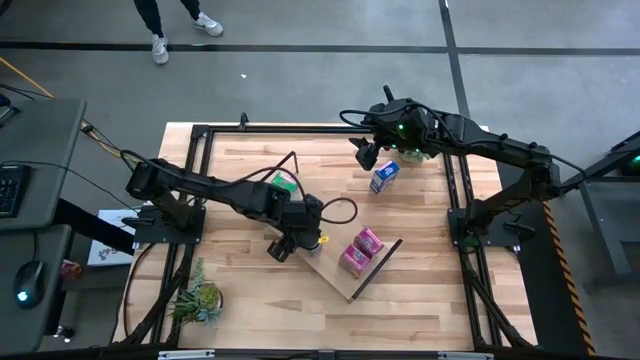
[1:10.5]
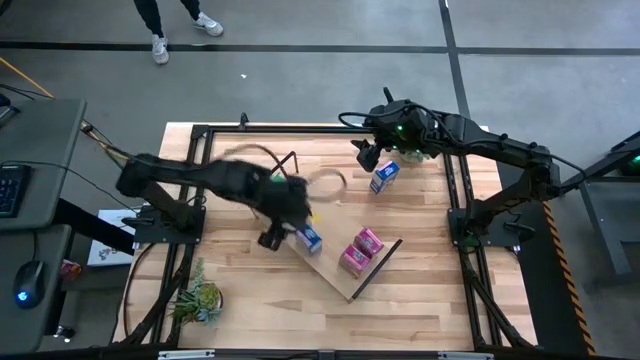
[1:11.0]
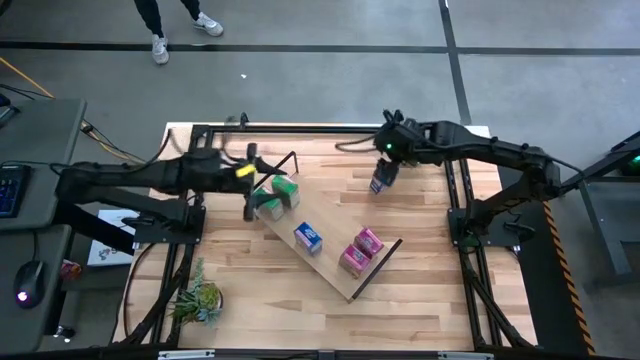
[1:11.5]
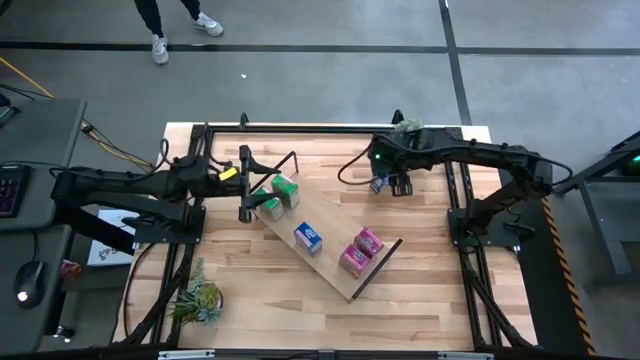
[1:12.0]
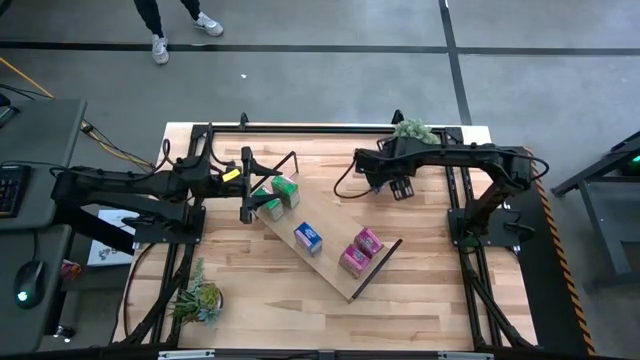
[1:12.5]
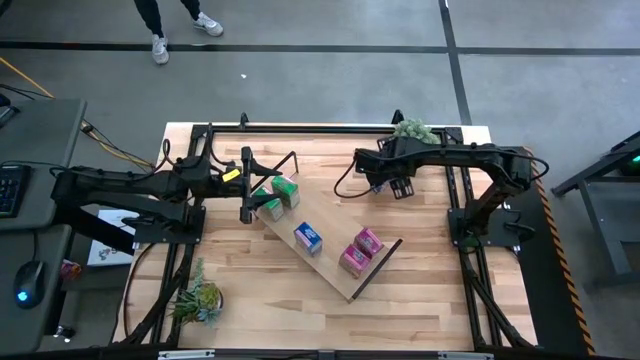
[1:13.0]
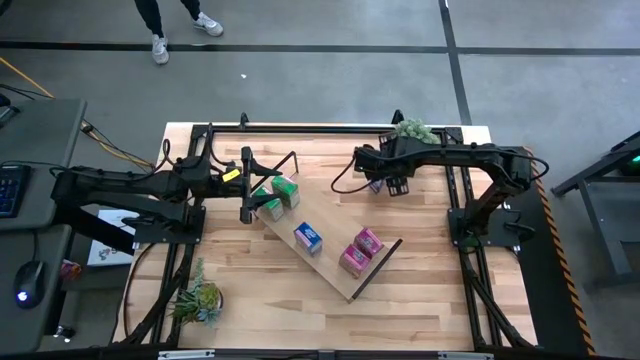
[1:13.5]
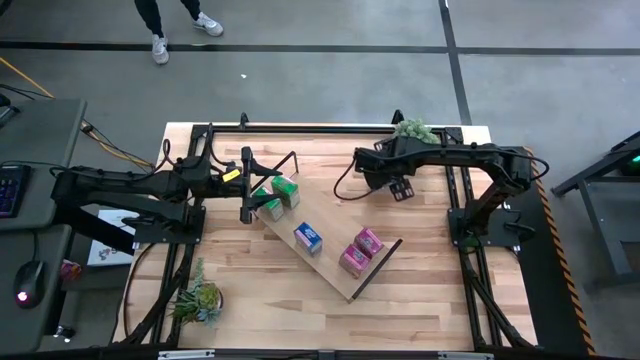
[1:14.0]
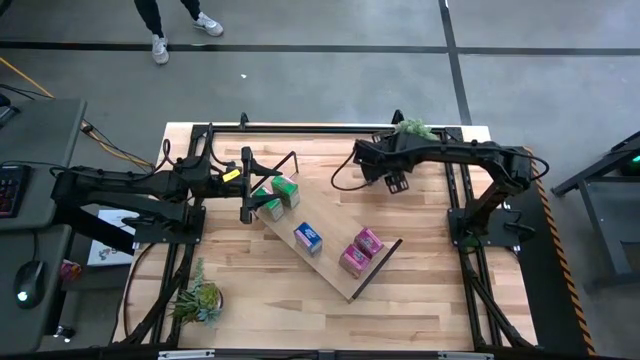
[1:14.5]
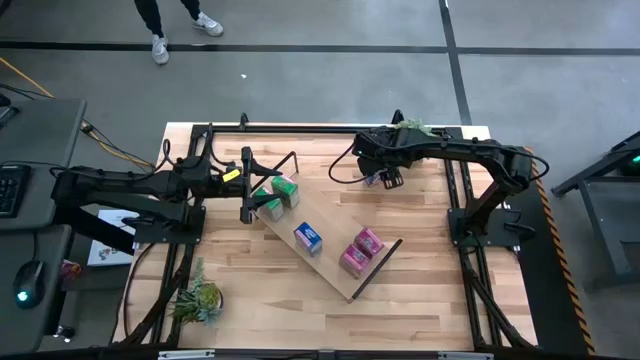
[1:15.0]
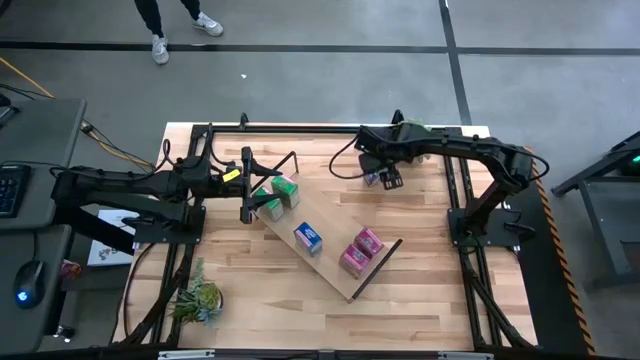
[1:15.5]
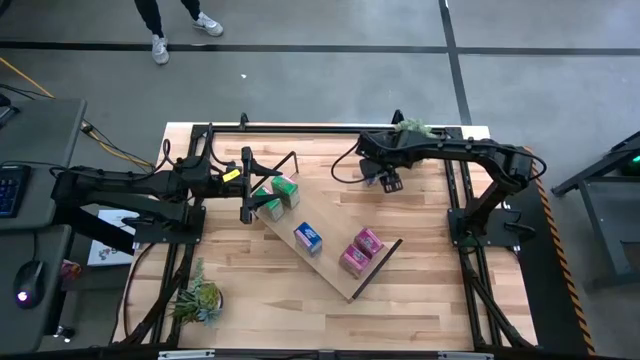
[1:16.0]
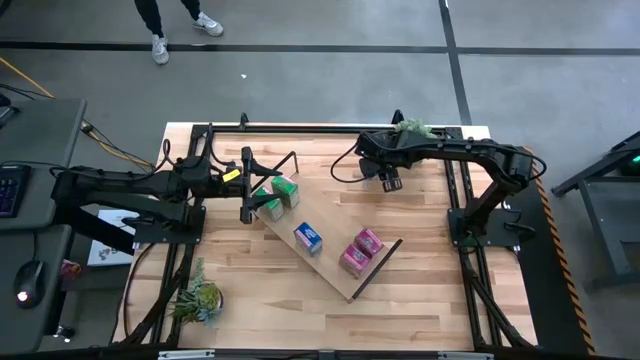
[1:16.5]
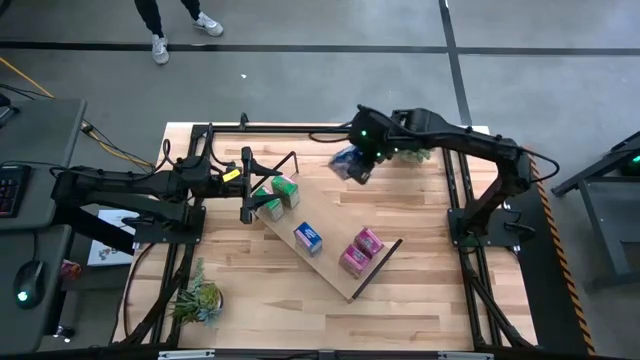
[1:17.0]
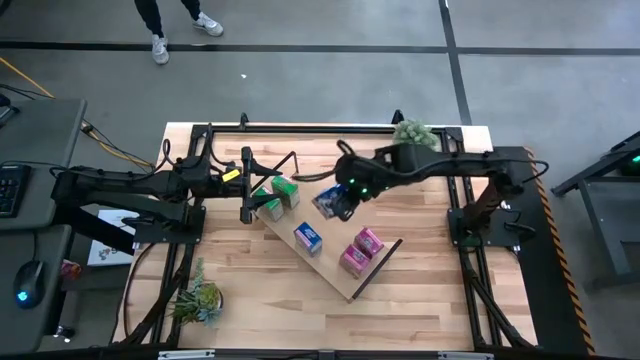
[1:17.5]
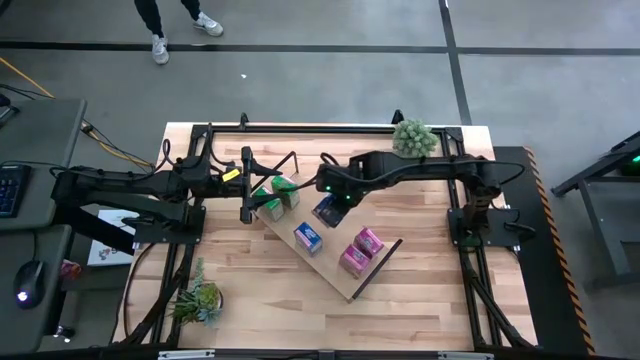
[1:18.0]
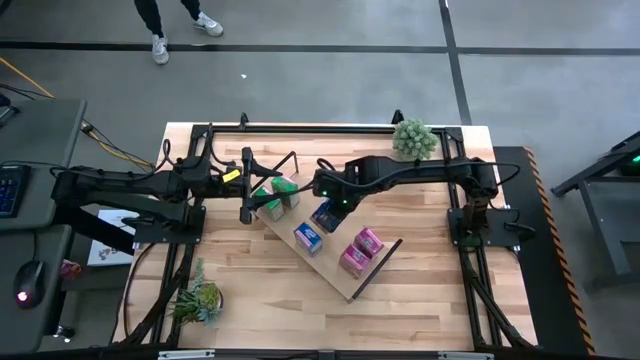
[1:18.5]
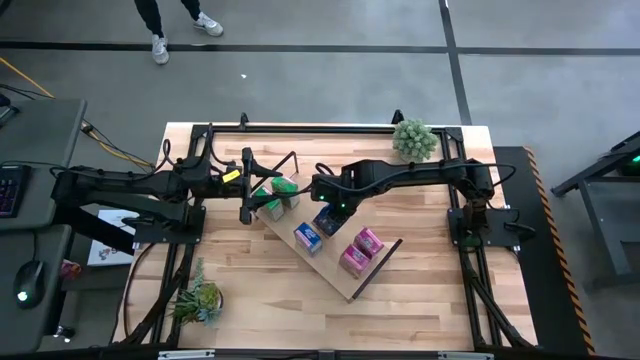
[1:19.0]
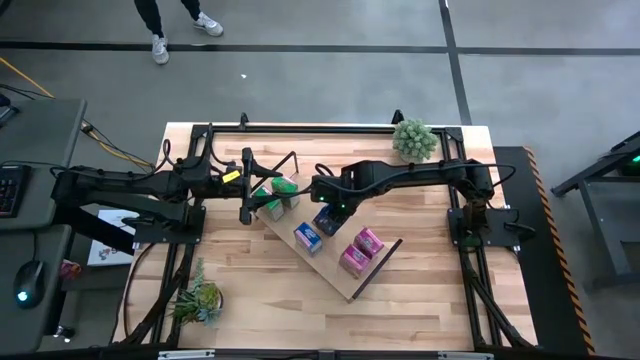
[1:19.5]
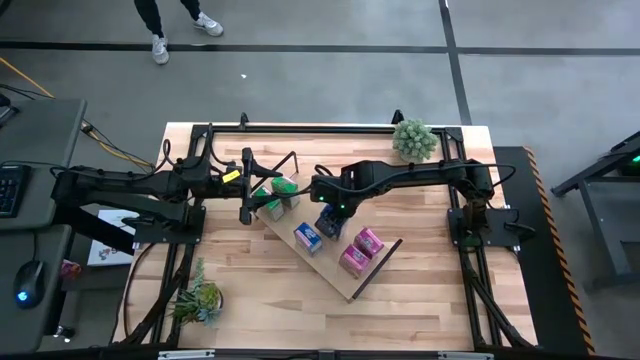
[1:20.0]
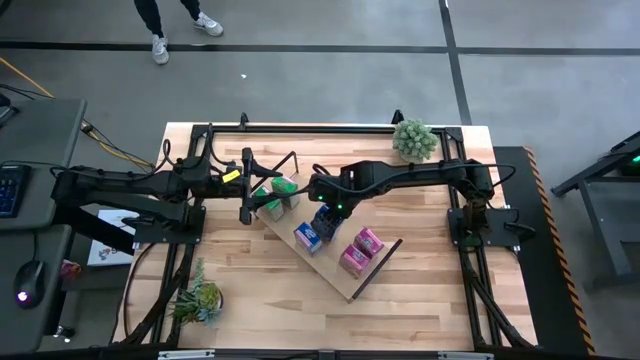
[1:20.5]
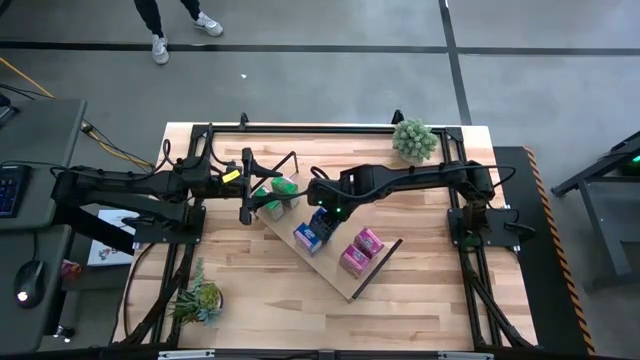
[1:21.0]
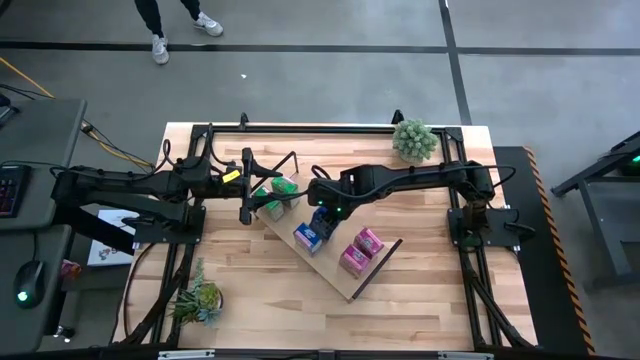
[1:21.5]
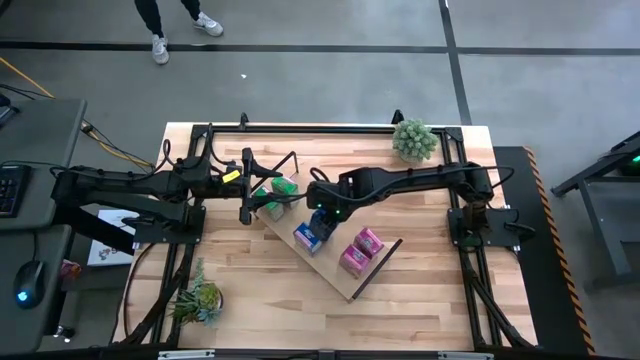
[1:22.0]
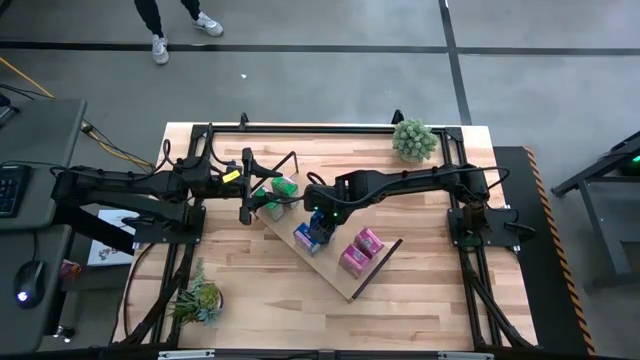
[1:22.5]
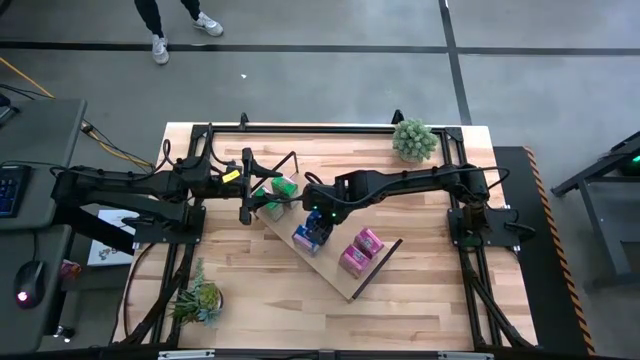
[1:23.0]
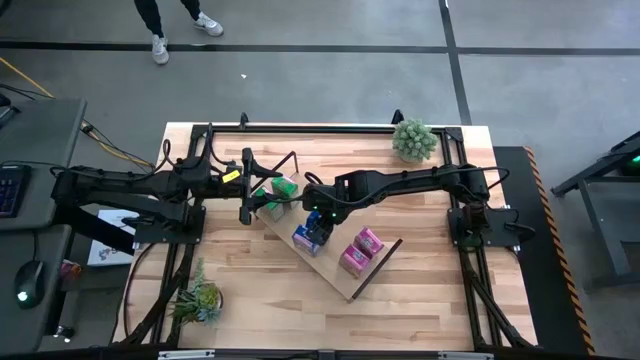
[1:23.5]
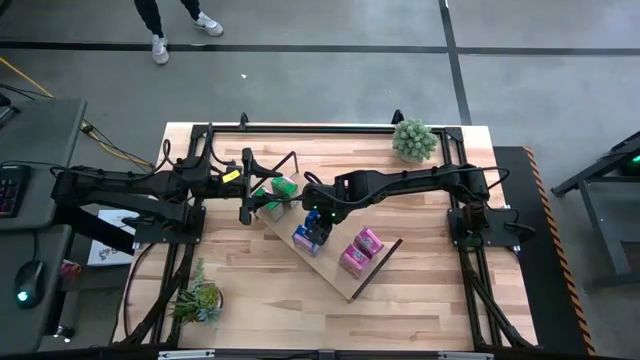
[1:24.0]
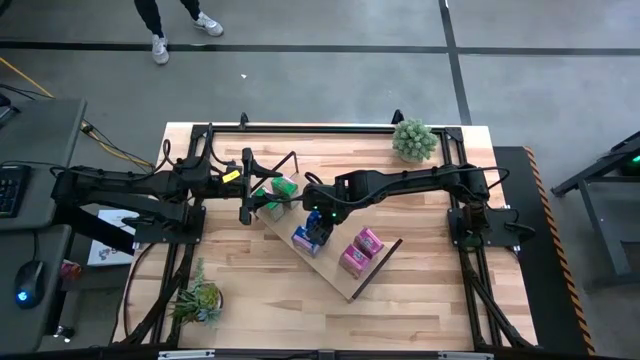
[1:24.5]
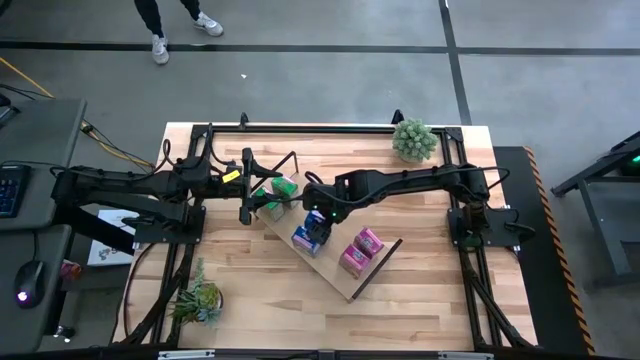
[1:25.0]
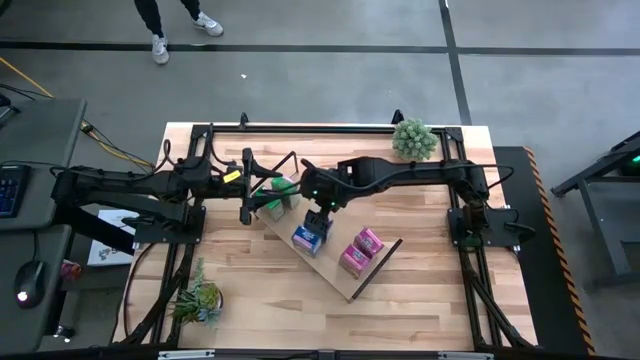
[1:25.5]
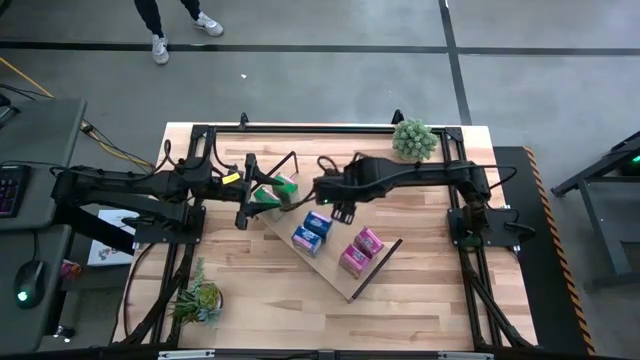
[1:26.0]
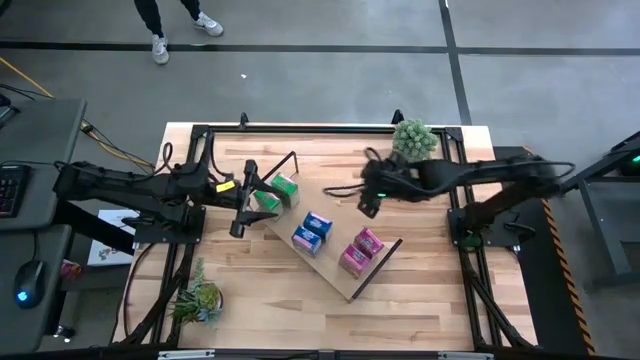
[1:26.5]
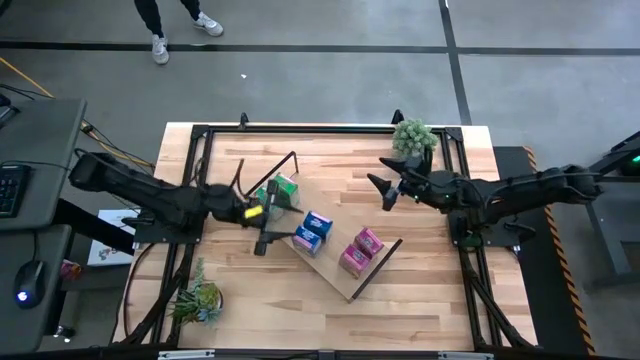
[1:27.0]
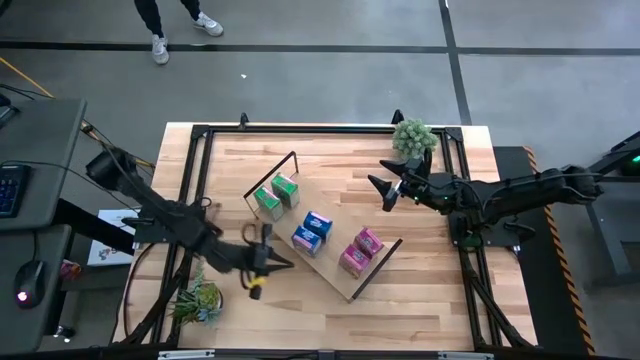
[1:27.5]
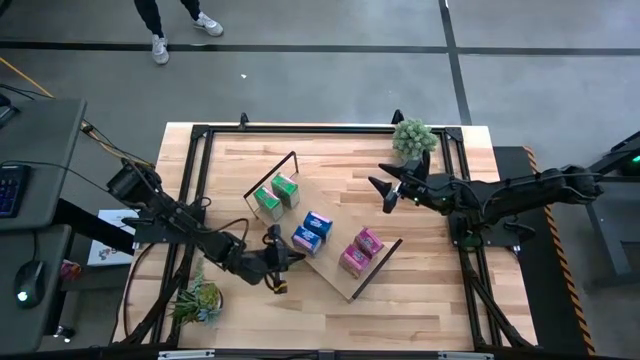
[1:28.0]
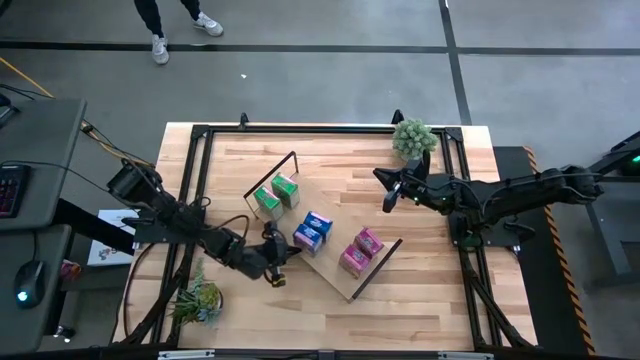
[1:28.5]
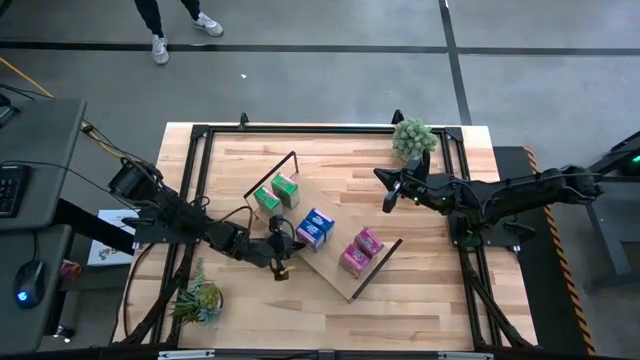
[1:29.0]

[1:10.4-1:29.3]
Task: Stack cereal on shelf
Put the blue cereal box on the shelf
